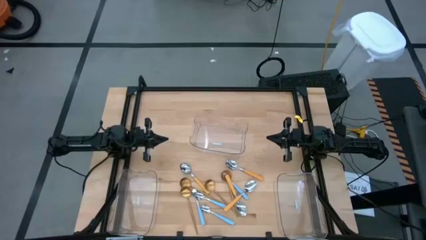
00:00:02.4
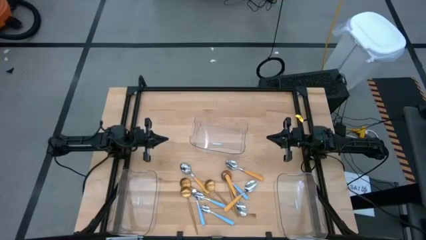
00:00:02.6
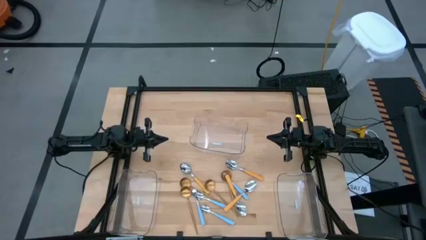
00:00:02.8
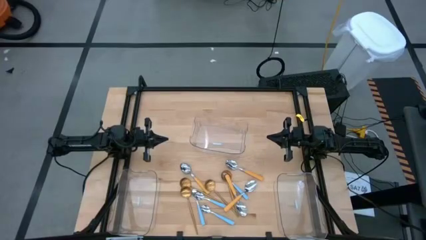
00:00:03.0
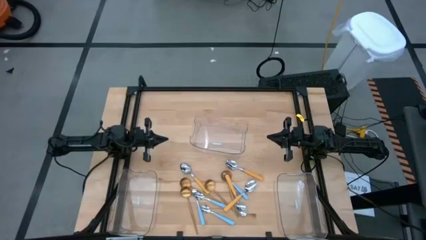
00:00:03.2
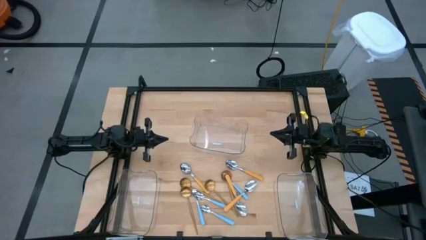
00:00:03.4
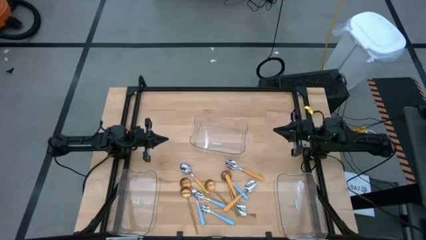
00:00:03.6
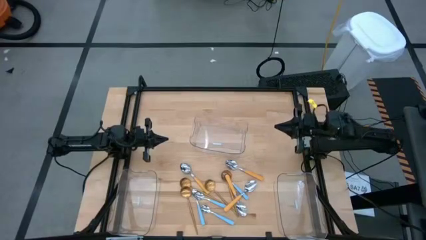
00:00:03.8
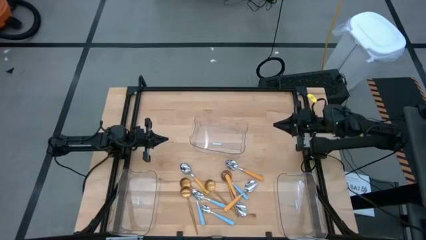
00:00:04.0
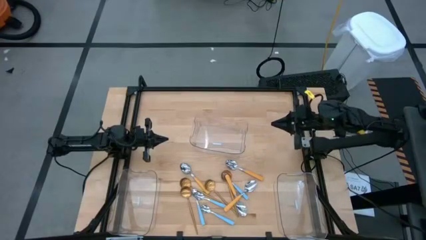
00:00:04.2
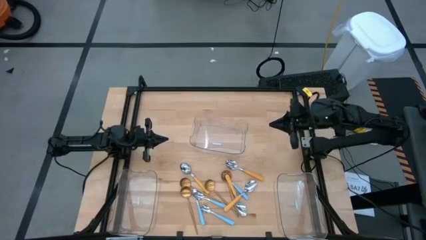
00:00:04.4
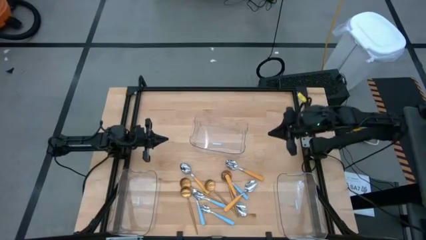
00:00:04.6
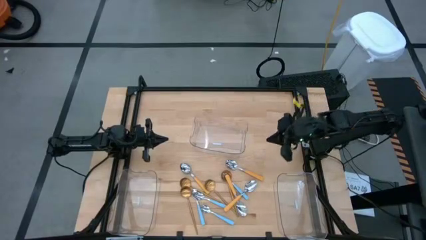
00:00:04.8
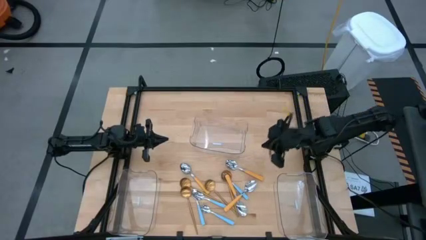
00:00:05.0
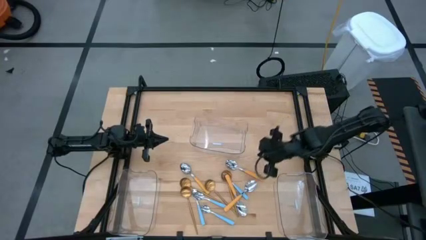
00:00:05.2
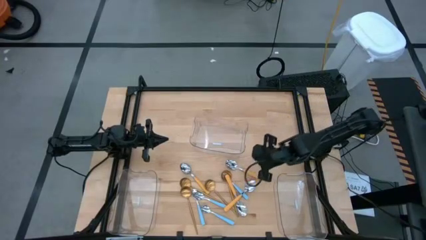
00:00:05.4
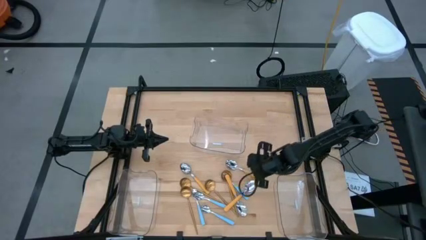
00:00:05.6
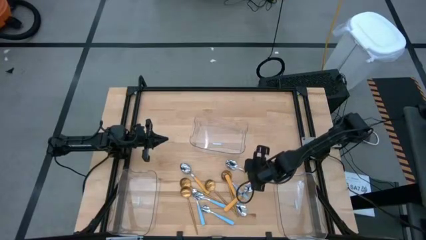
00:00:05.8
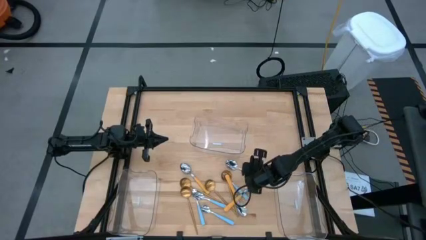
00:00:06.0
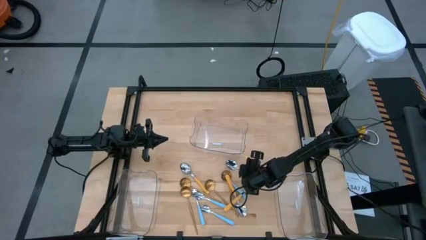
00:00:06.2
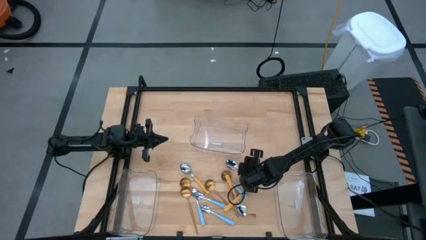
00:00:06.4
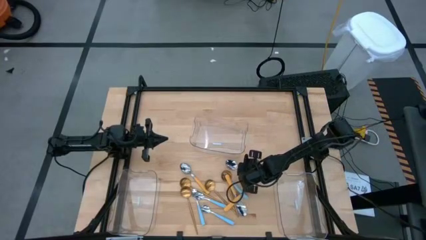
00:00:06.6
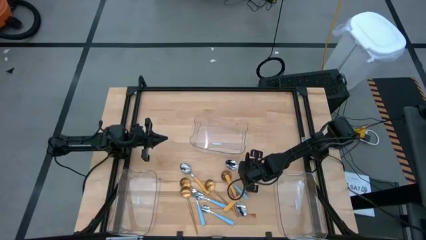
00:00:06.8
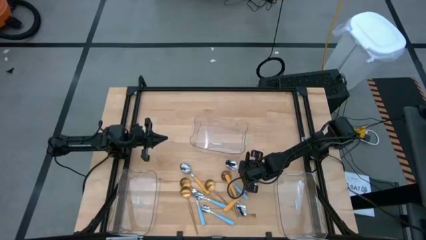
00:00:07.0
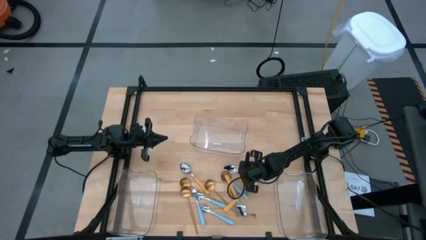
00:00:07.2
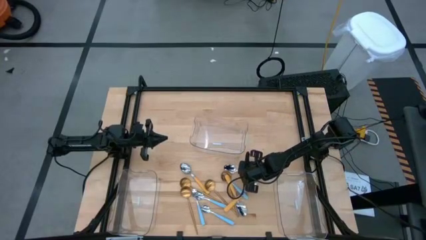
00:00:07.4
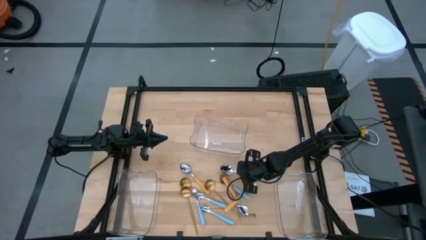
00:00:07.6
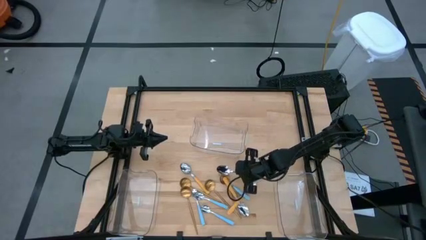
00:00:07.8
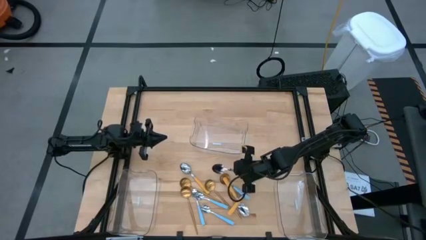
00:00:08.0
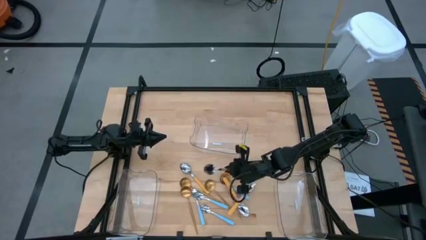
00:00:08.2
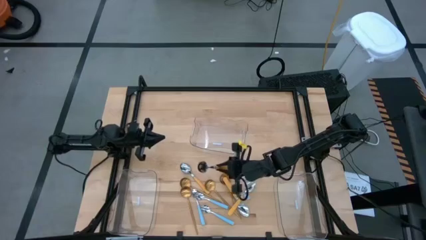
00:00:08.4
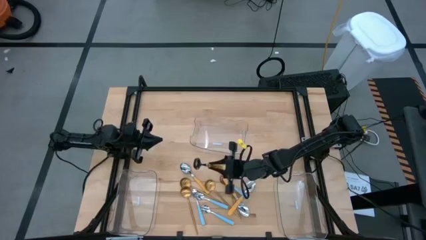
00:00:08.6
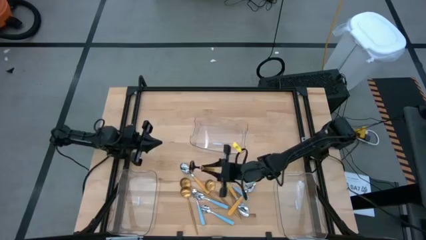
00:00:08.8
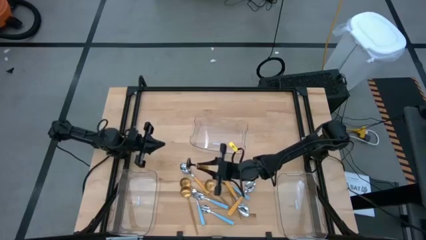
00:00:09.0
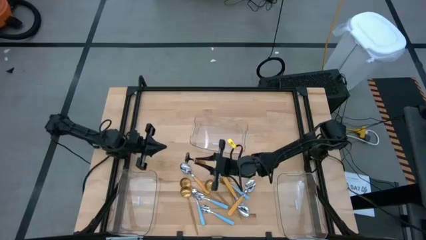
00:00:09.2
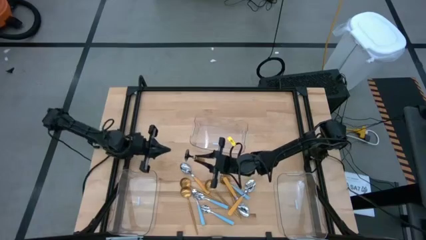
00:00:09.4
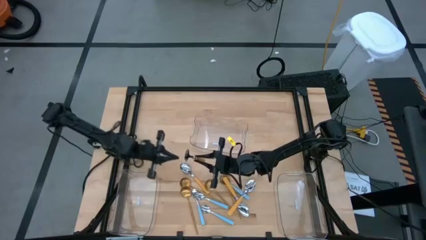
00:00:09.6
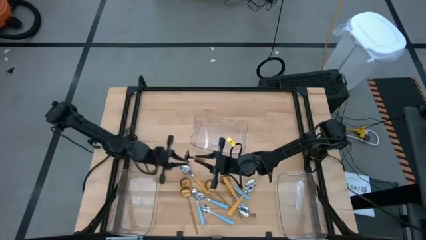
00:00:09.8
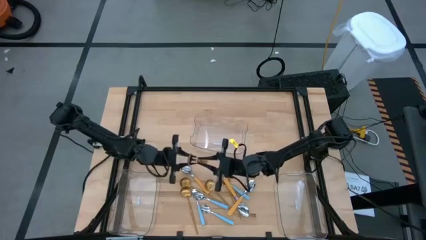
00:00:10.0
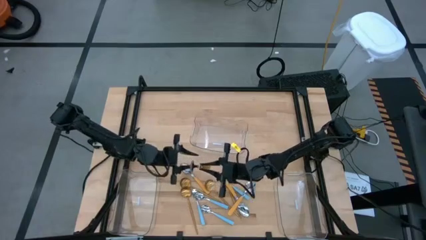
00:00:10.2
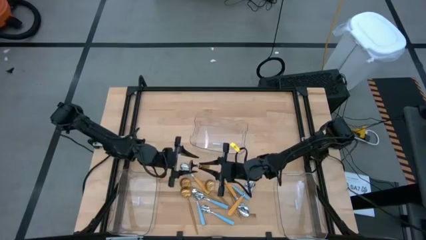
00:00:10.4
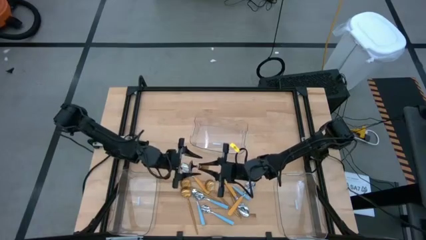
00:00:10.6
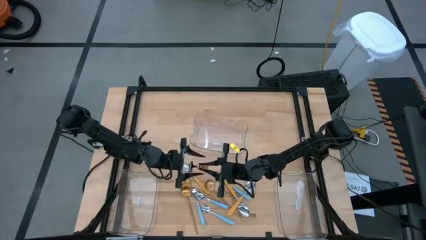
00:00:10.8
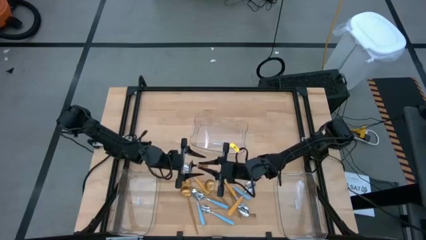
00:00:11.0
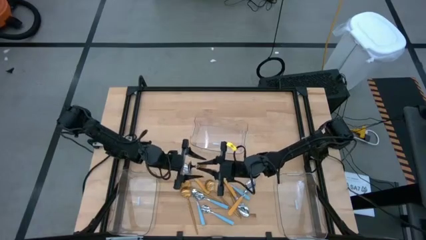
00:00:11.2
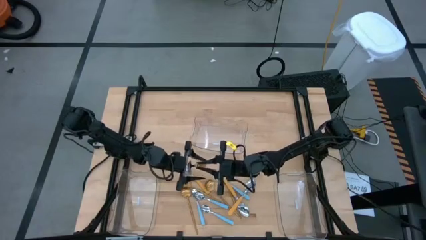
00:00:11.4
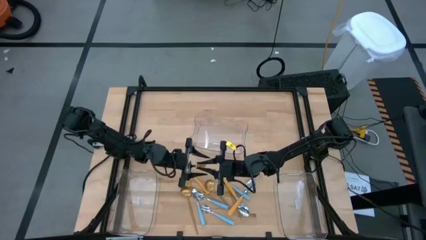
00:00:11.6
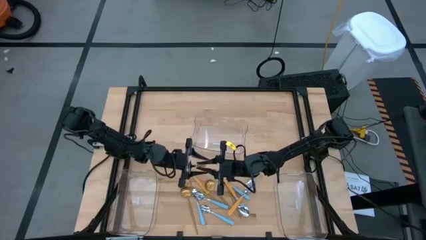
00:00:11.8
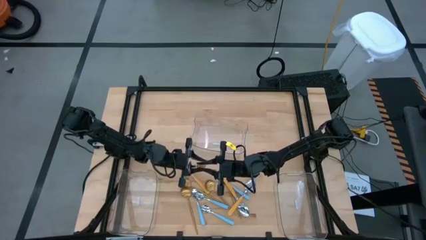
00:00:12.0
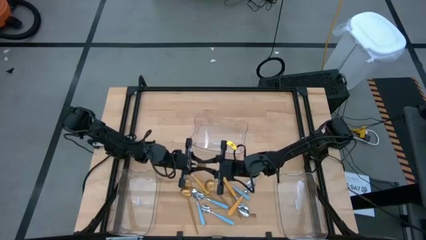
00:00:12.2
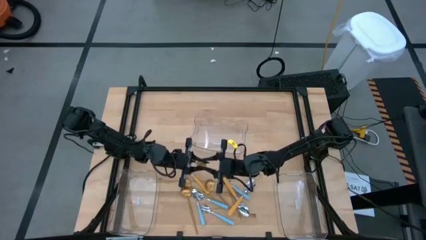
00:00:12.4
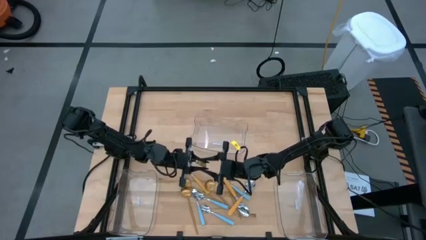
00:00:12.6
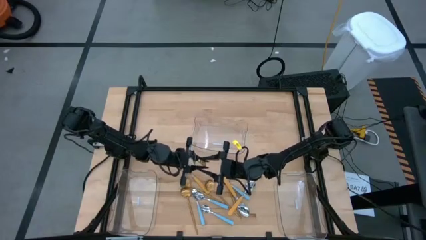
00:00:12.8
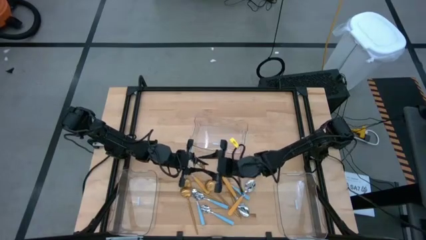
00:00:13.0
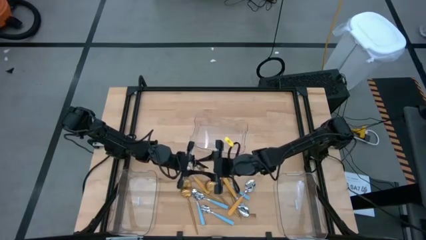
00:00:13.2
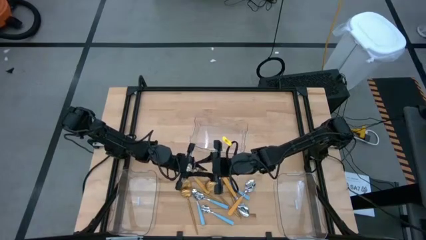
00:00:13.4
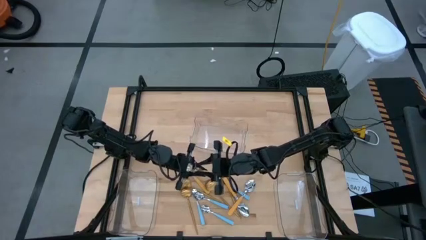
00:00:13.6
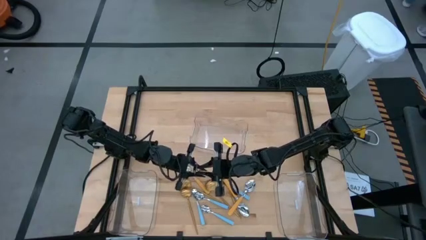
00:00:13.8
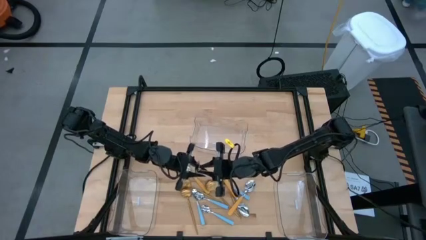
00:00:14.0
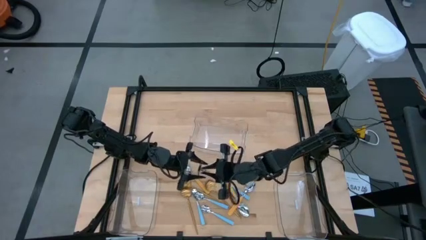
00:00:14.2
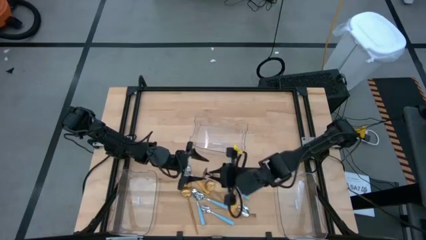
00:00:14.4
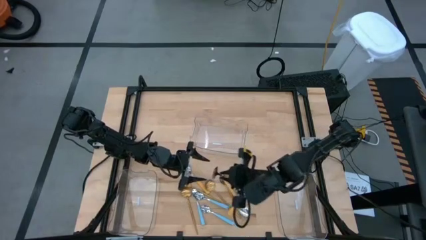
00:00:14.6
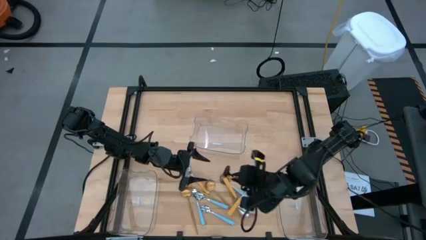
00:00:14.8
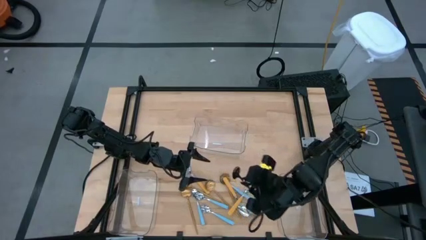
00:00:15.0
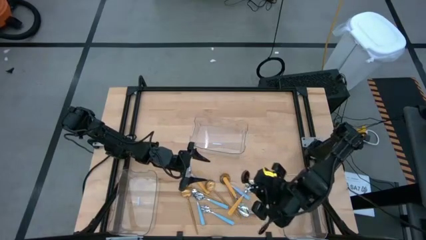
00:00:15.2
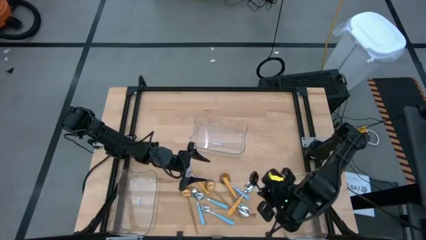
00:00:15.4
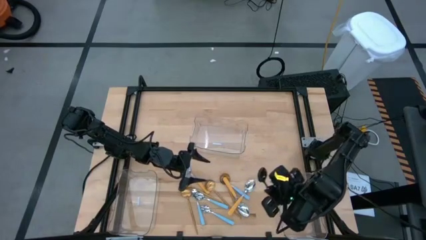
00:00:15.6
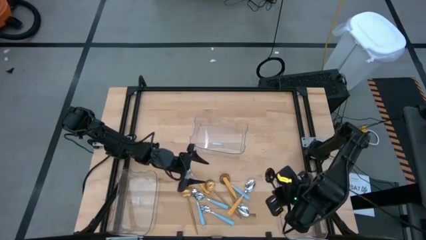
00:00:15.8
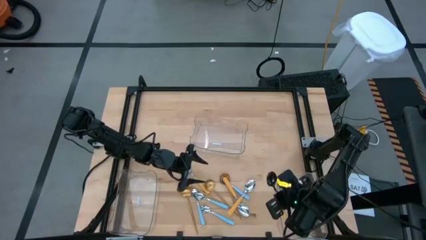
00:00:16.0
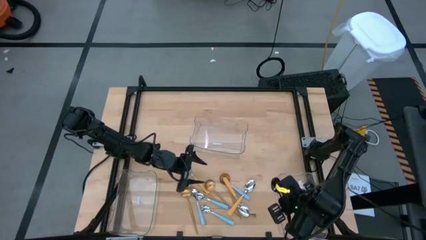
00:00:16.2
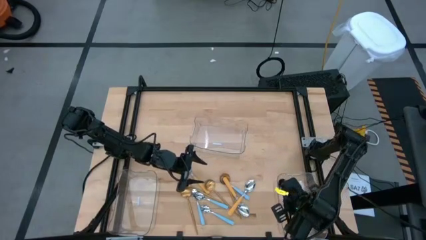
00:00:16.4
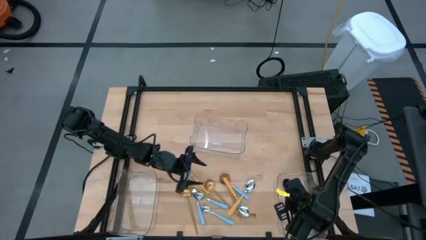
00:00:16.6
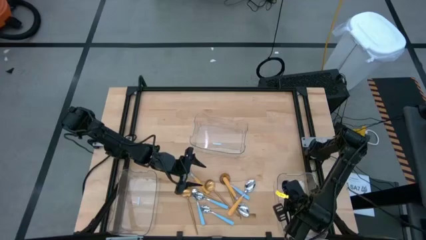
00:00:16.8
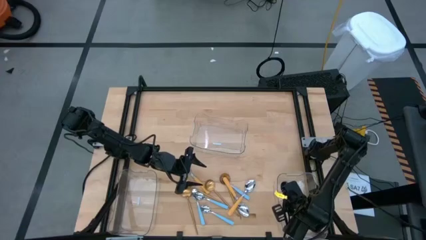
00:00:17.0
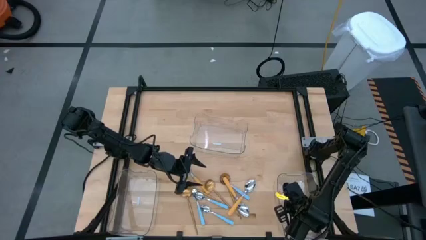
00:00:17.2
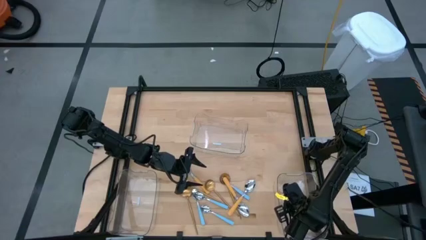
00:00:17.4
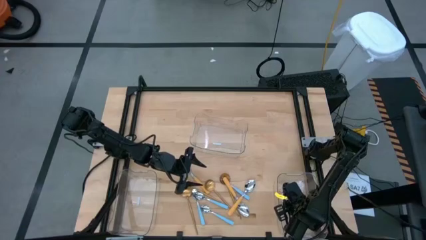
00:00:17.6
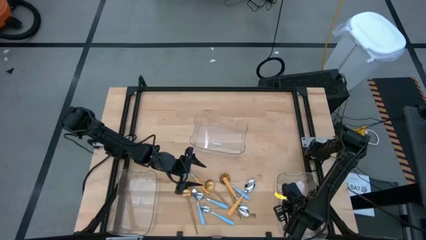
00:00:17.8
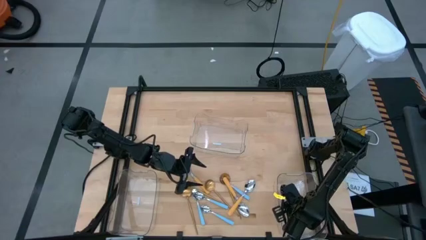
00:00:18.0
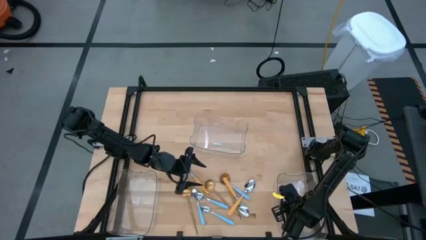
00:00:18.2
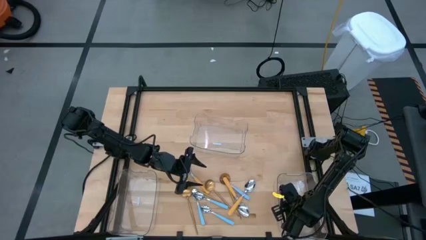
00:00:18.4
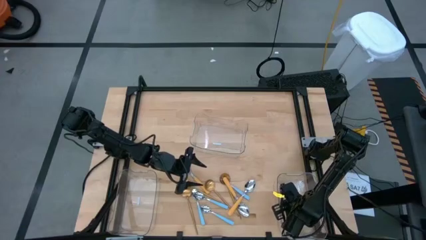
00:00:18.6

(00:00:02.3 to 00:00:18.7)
Task: Sort silverware by color (type)
Put the yellow spoon into the bottom right transparent bin
